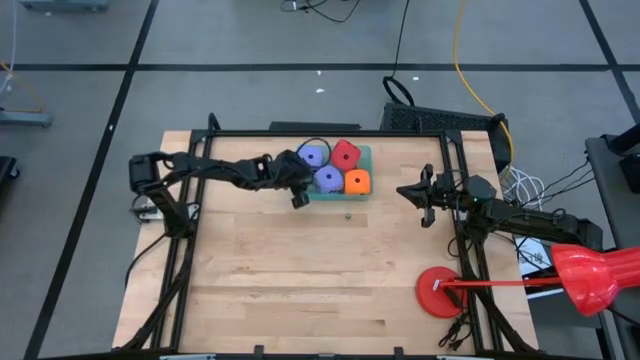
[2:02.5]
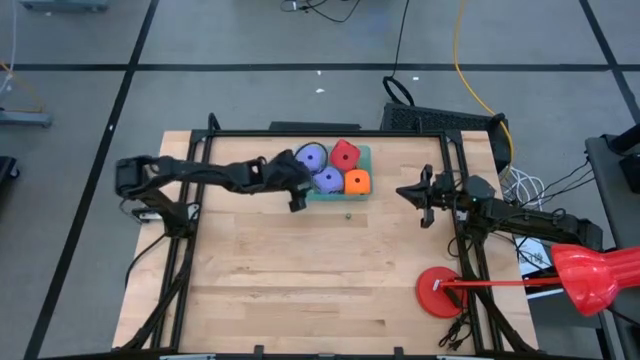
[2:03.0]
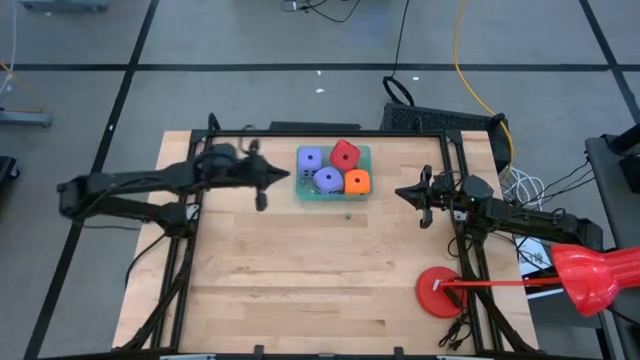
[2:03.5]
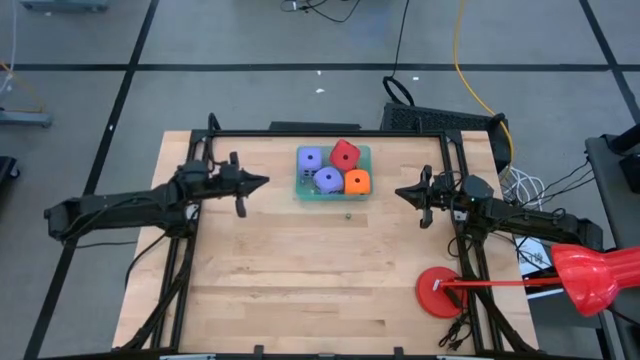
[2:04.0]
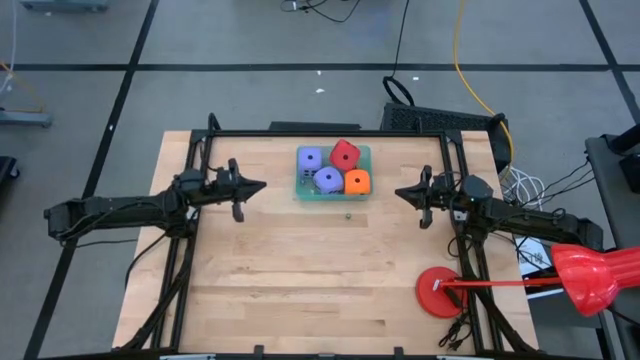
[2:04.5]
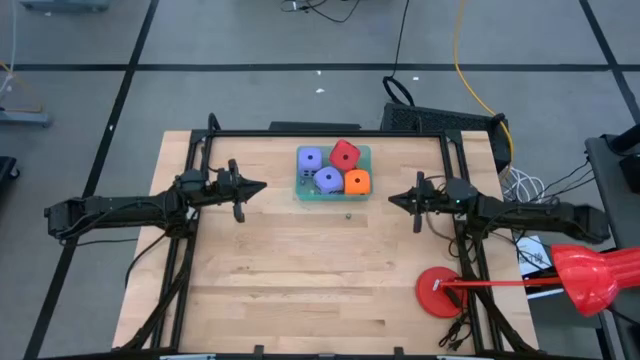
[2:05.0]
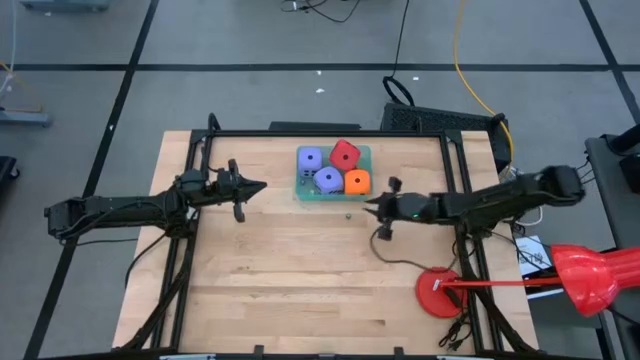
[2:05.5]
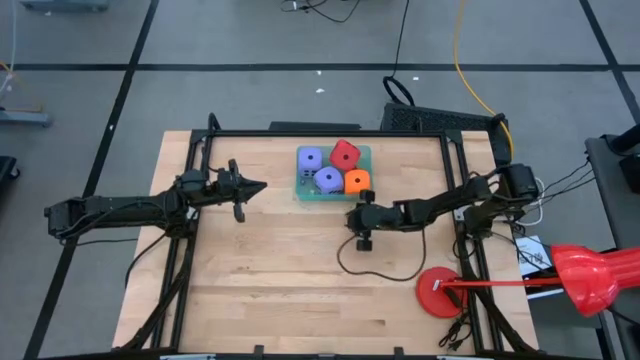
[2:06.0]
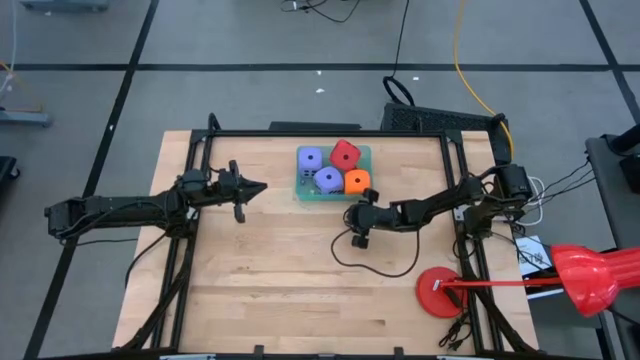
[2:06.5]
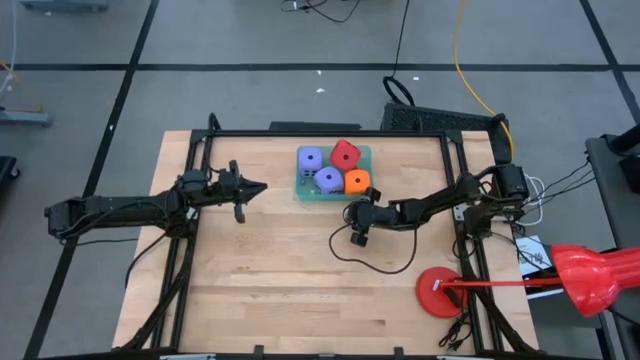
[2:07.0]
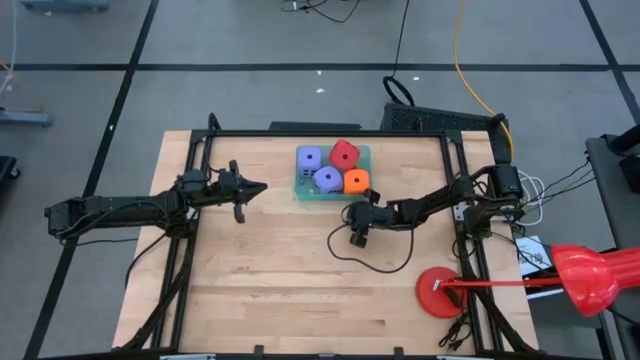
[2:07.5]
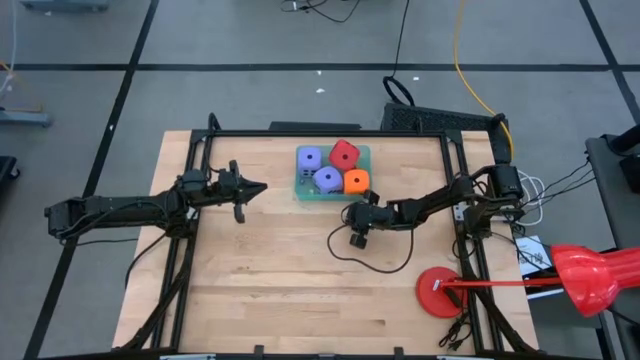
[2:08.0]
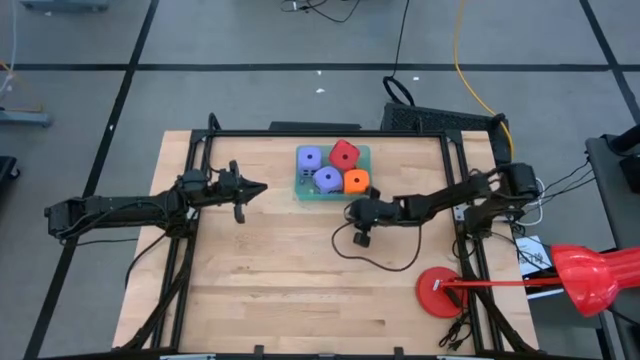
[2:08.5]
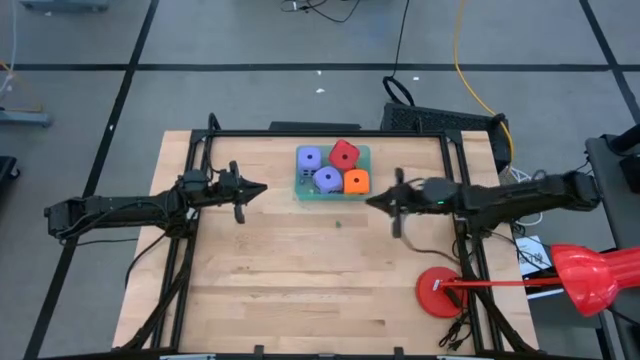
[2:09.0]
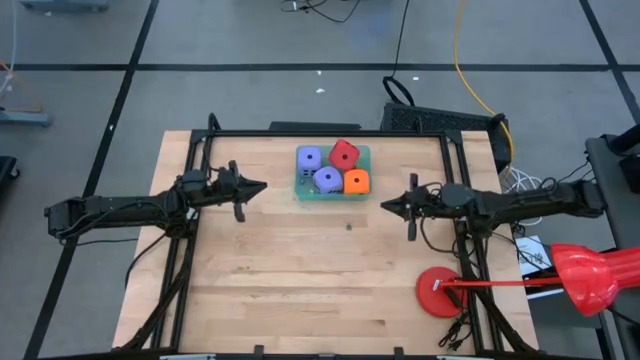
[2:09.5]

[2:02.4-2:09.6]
Task: Pick & Place Dice
Put the small dark green dice into the basket

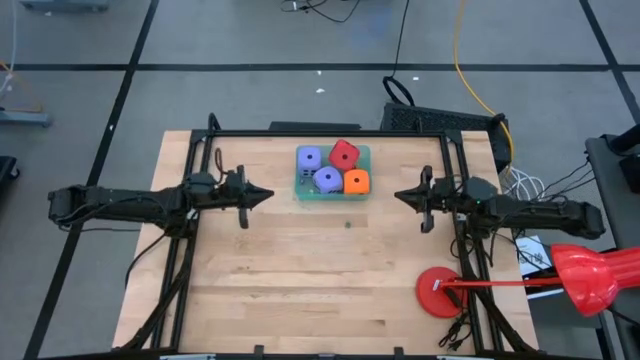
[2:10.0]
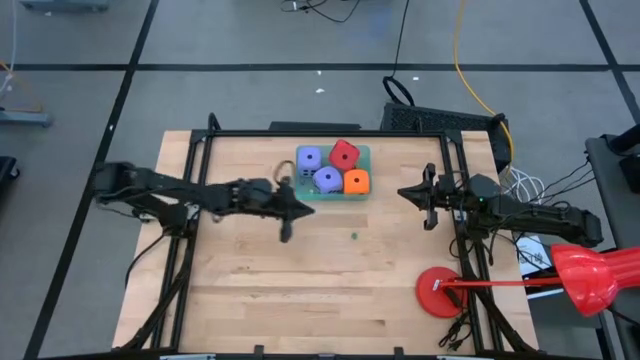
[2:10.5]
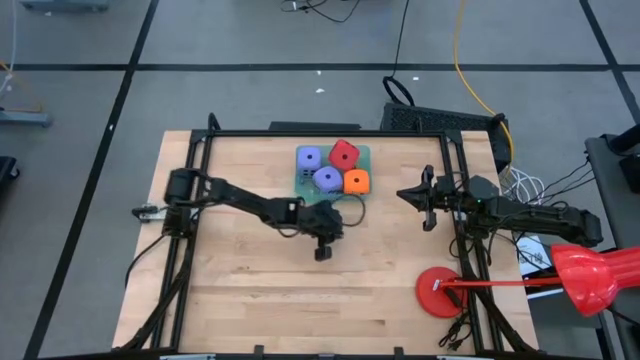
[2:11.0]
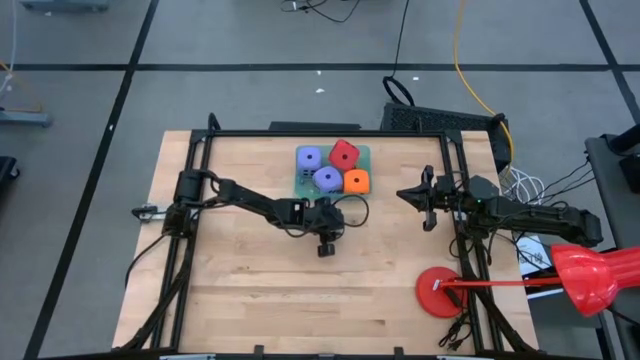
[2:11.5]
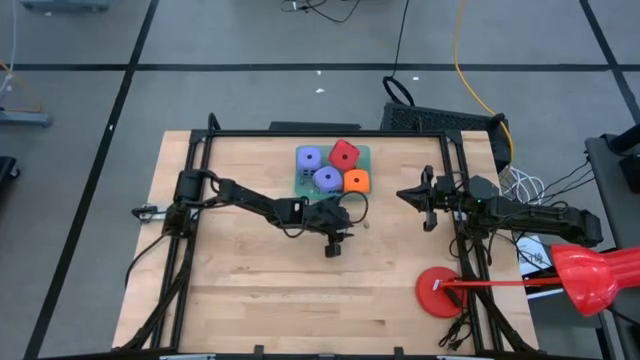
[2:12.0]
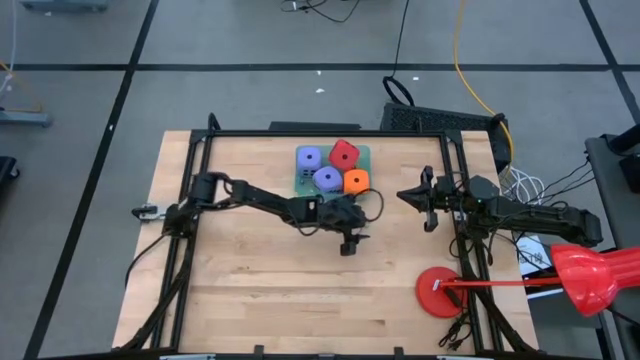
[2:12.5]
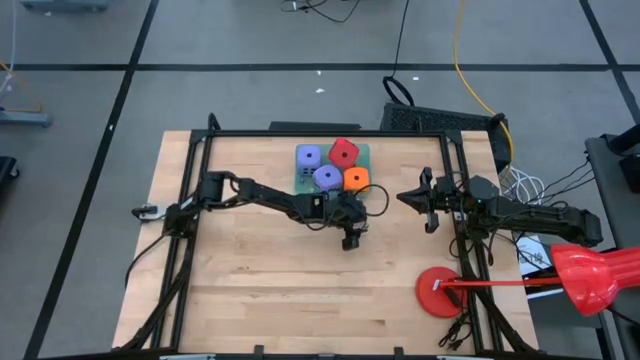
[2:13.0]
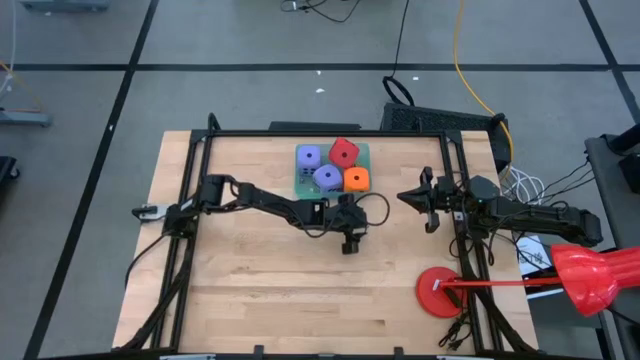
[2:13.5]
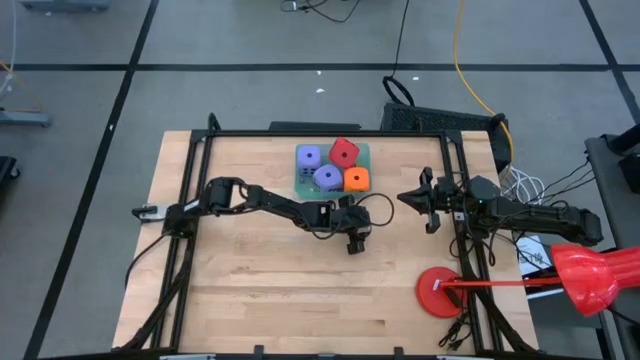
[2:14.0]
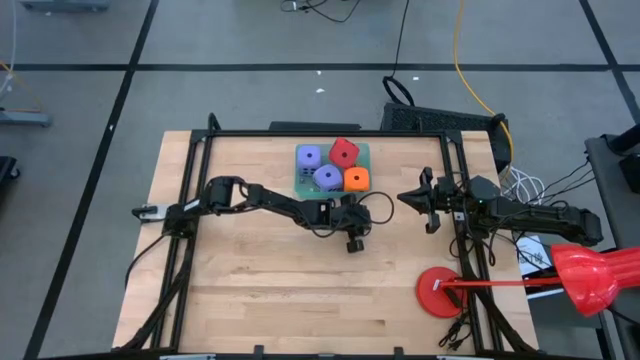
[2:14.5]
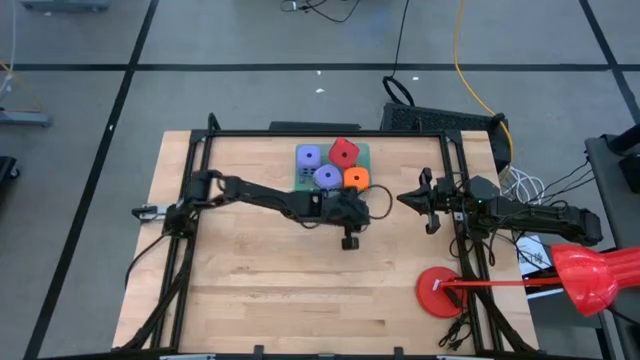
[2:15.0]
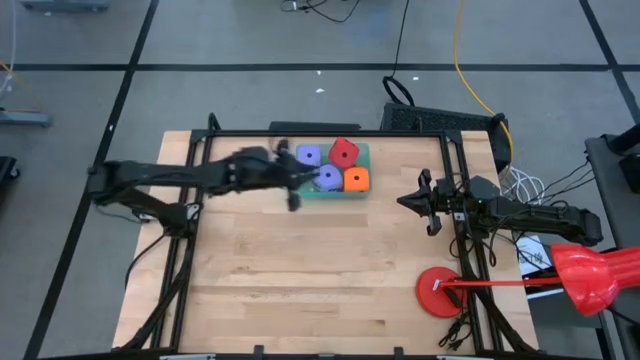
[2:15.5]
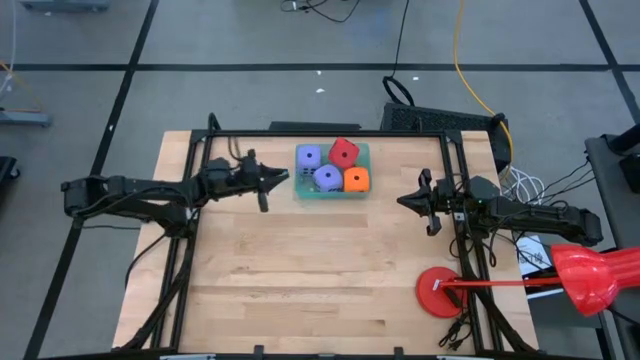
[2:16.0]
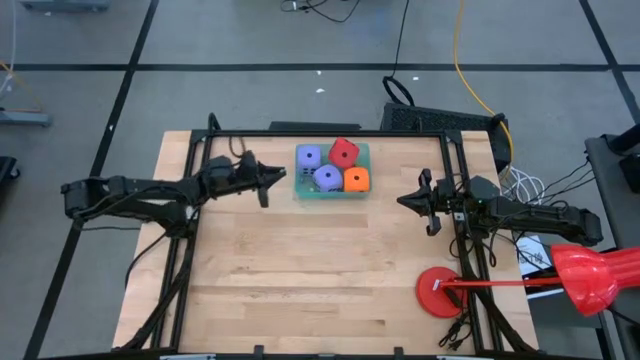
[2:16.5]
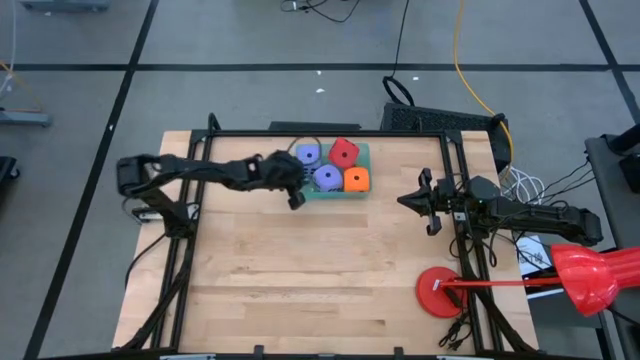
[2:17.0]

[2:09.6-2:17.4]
Put the small dark green dice into the basket

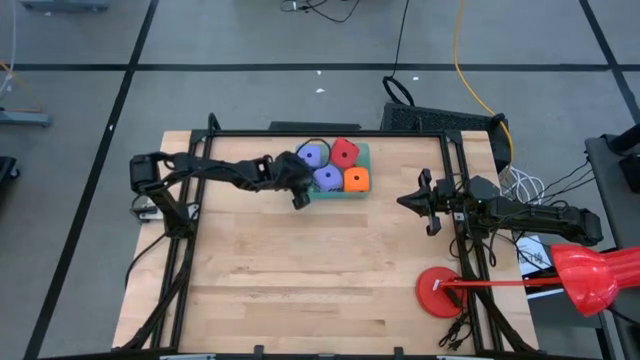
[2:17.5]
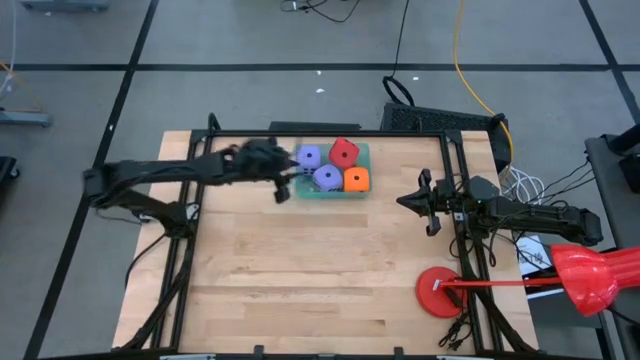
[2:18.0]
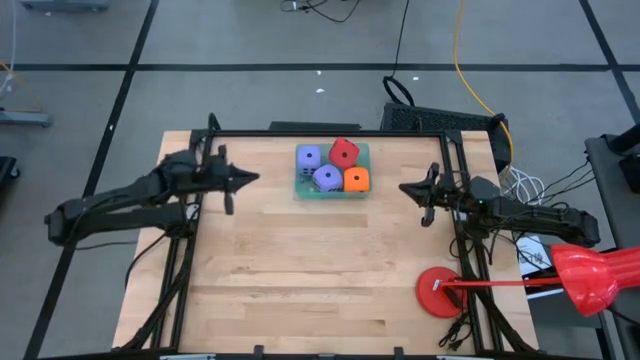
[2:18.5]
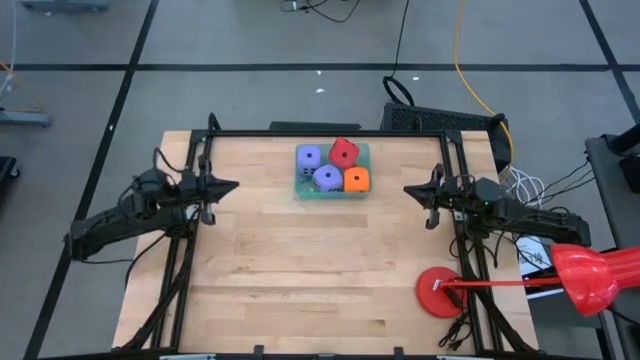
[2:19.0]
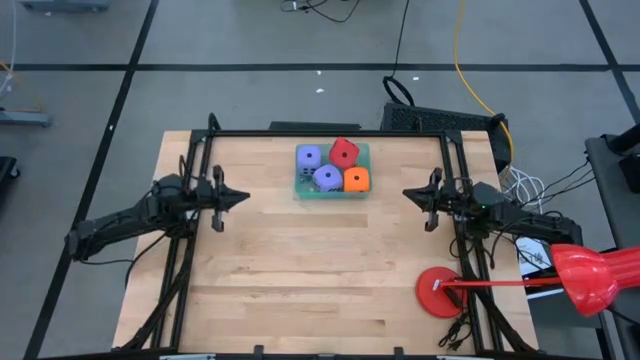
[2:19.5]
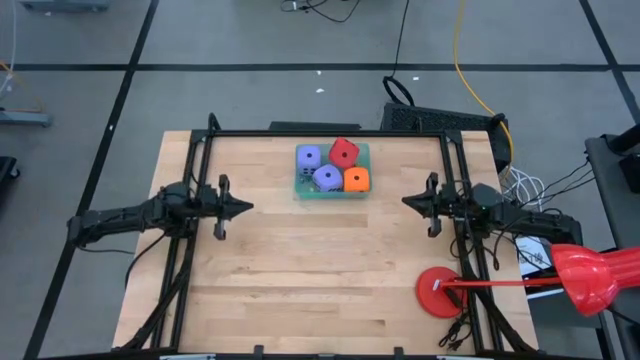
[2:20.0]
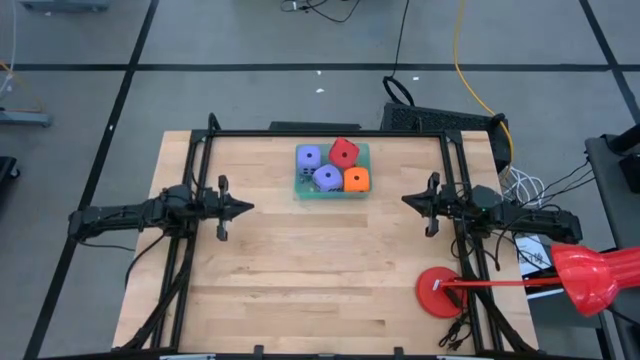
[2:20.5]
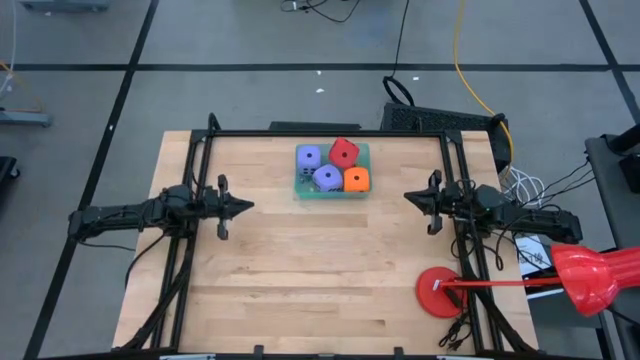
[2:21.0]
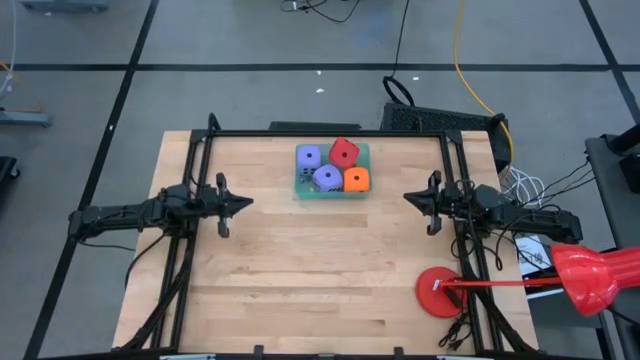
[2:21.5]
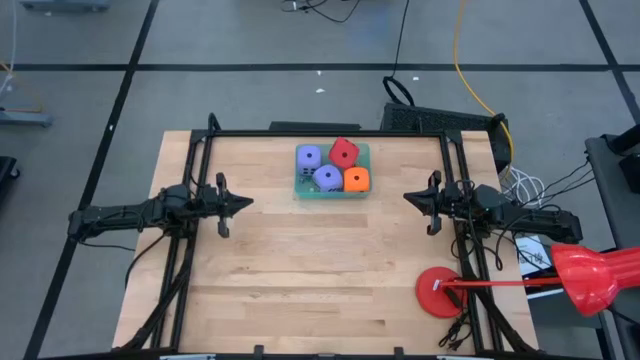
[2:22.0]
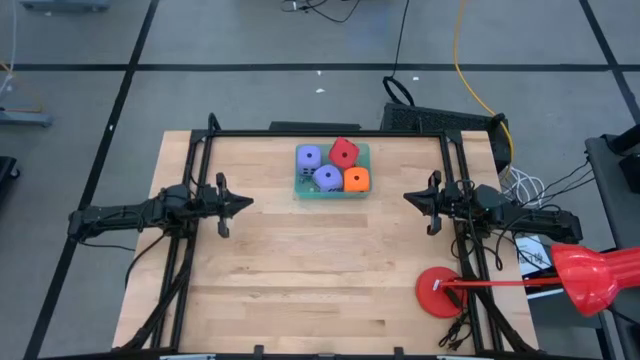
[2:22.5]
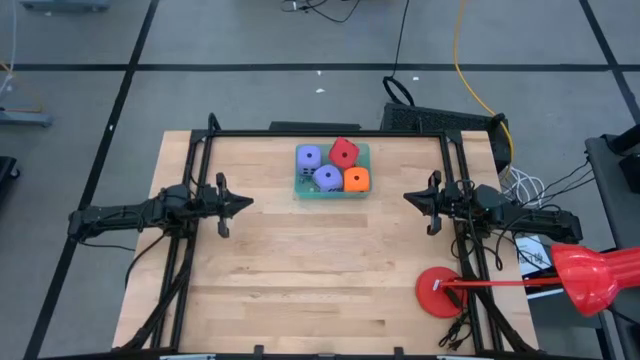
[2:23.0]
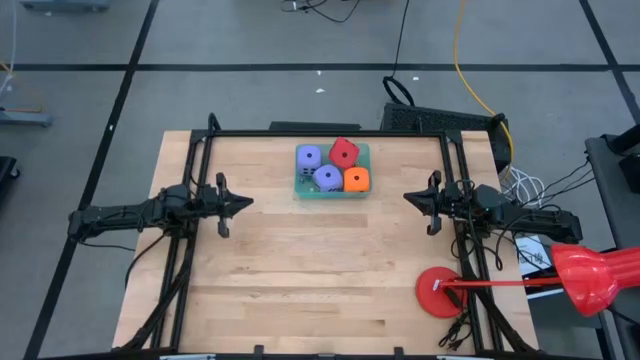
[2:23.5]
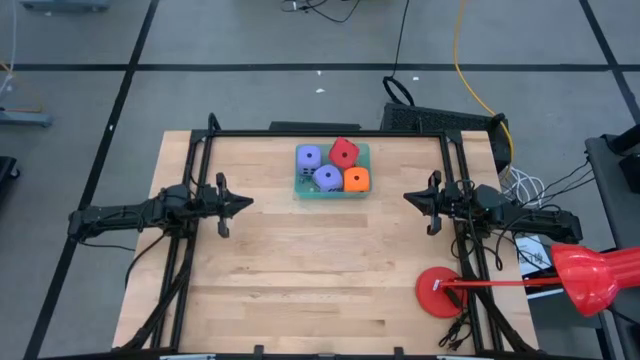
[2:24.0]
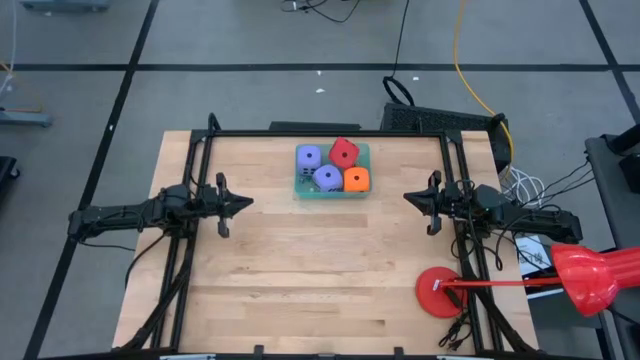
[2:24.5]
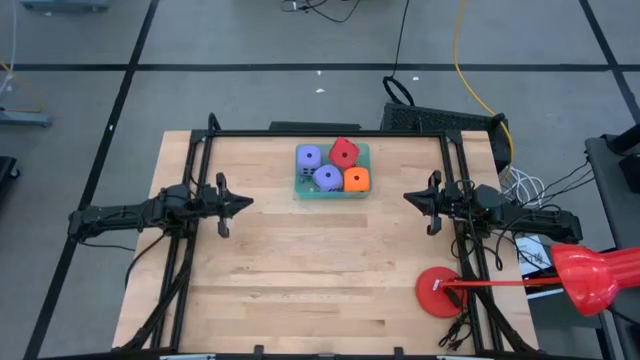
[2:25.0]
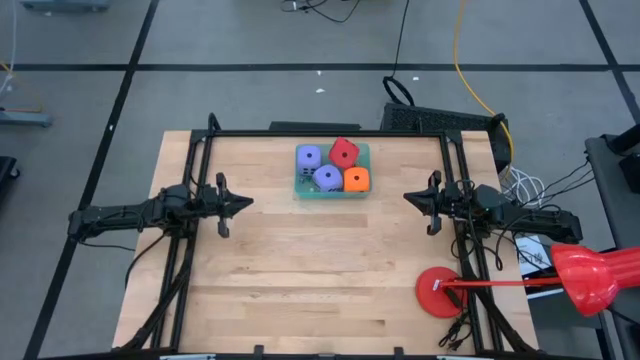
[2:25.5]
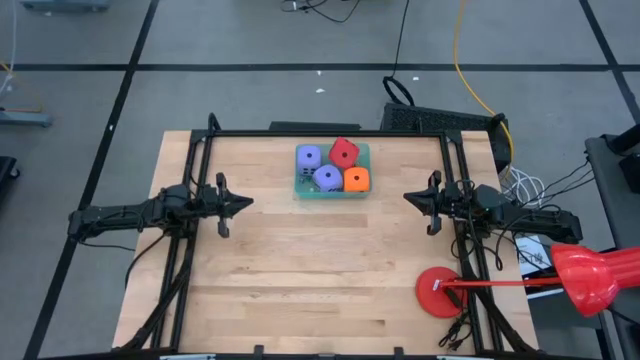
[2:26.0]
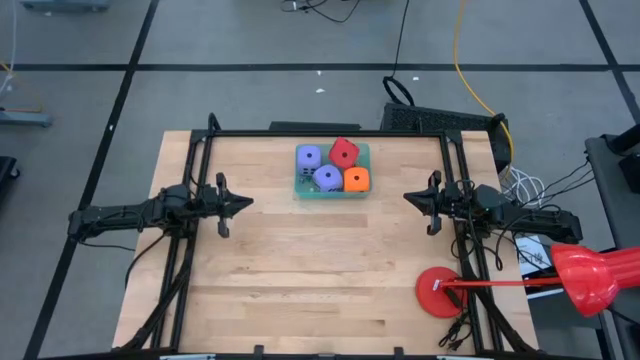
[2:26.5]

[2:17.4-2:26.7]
Return to Home Position
